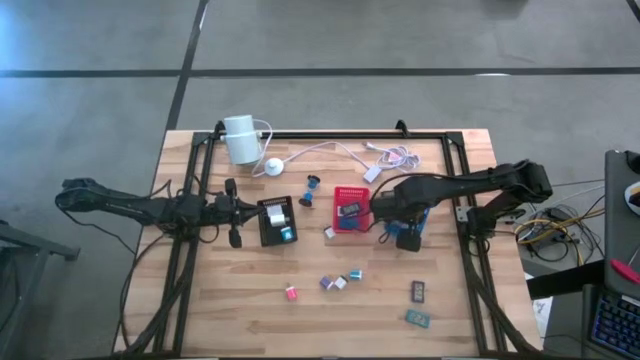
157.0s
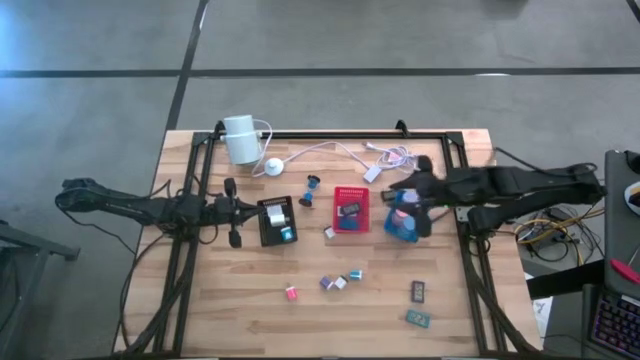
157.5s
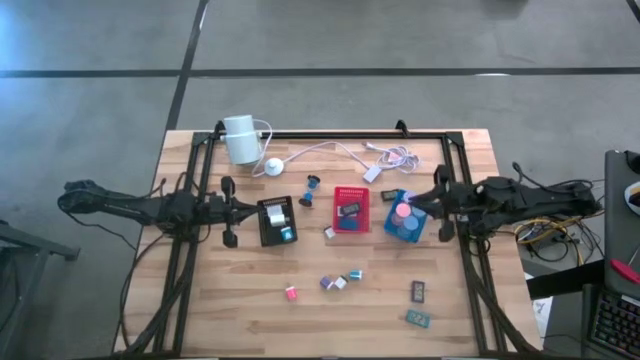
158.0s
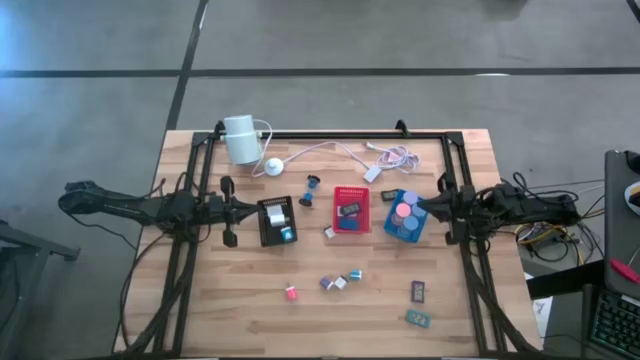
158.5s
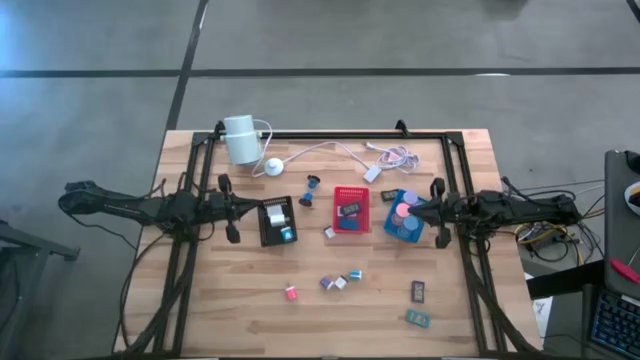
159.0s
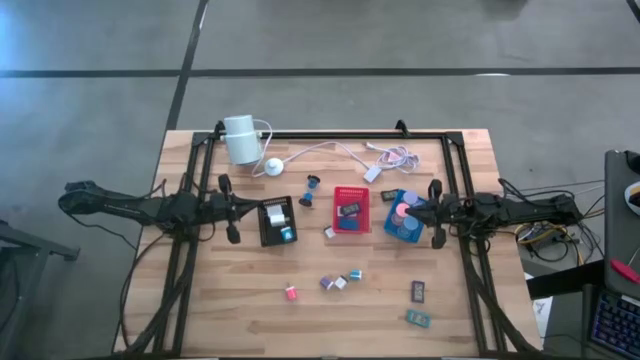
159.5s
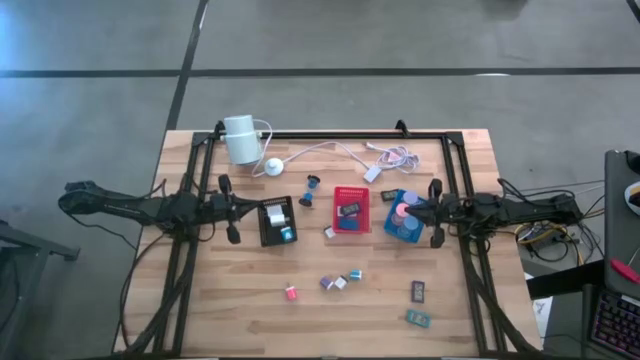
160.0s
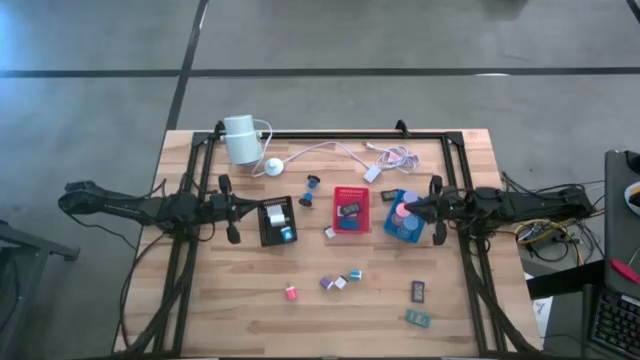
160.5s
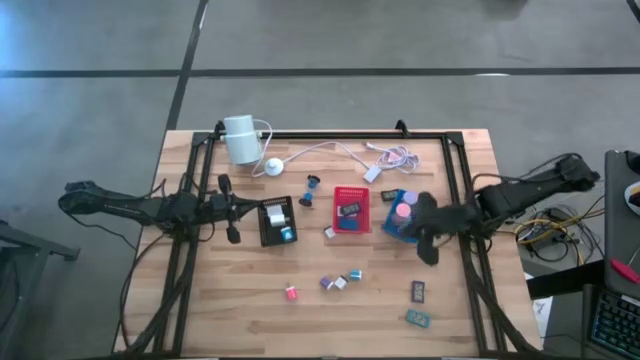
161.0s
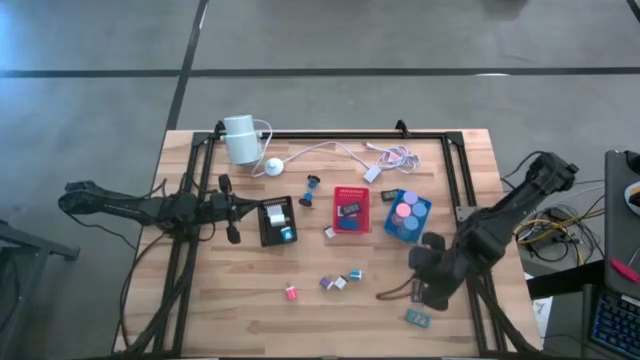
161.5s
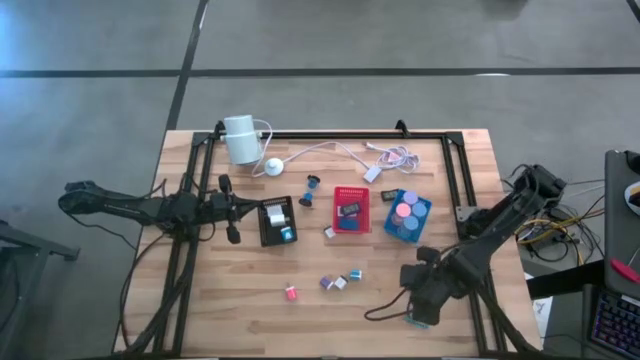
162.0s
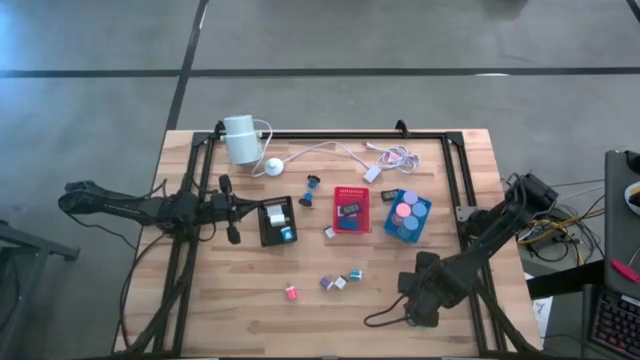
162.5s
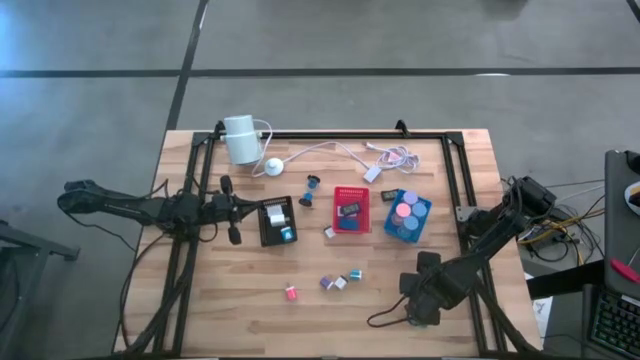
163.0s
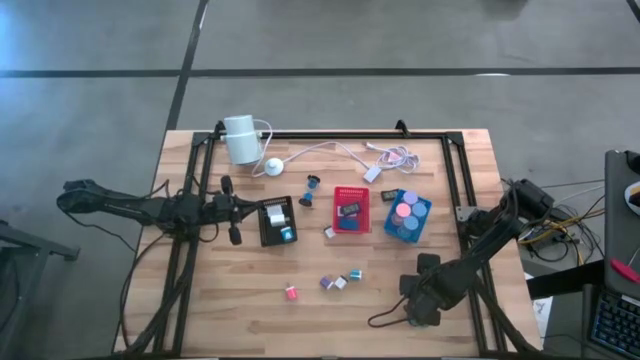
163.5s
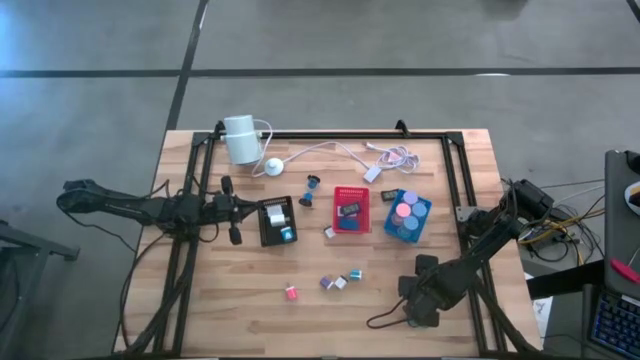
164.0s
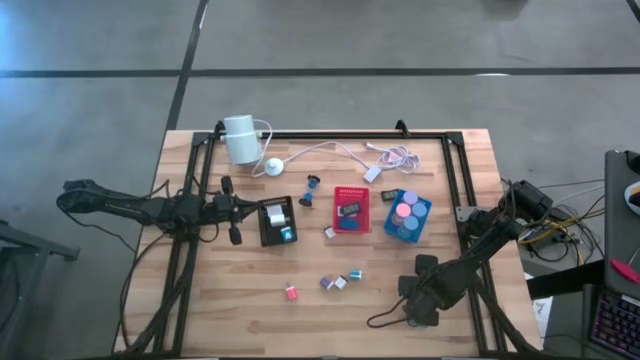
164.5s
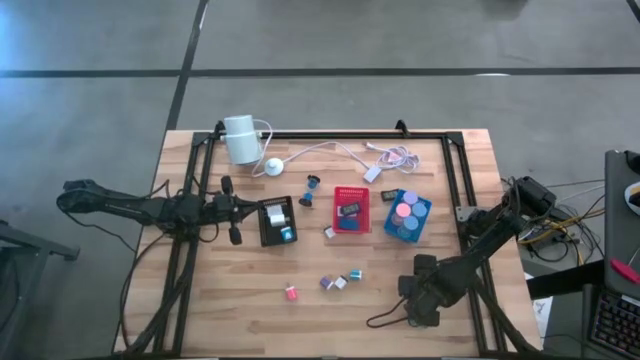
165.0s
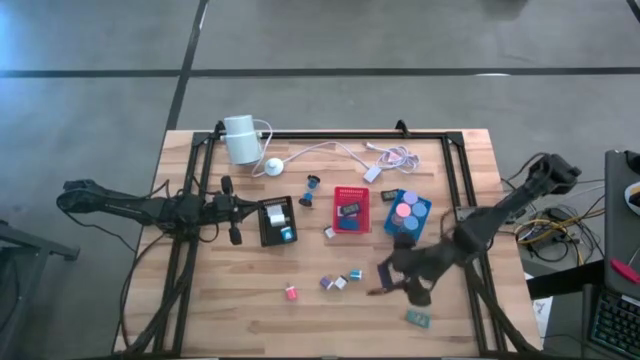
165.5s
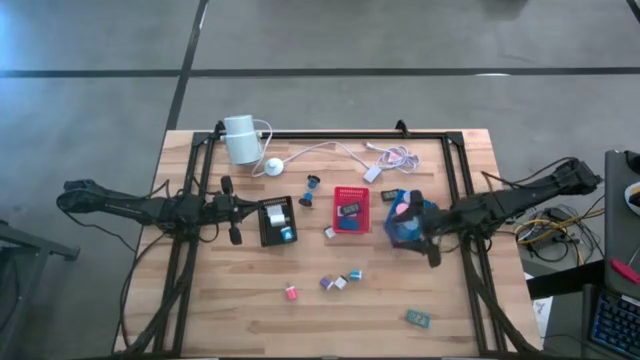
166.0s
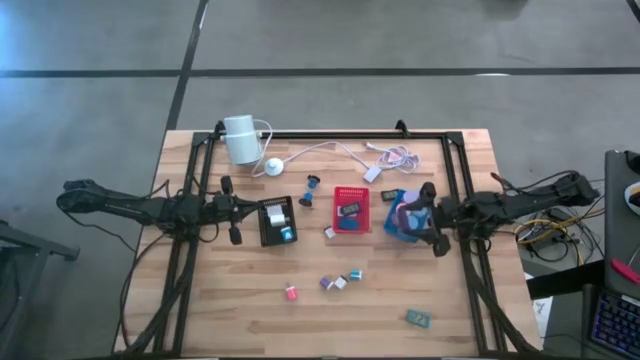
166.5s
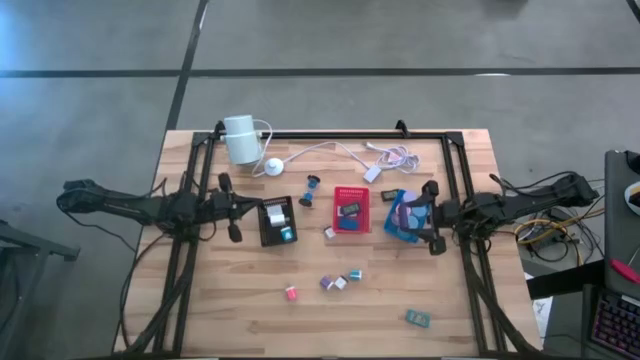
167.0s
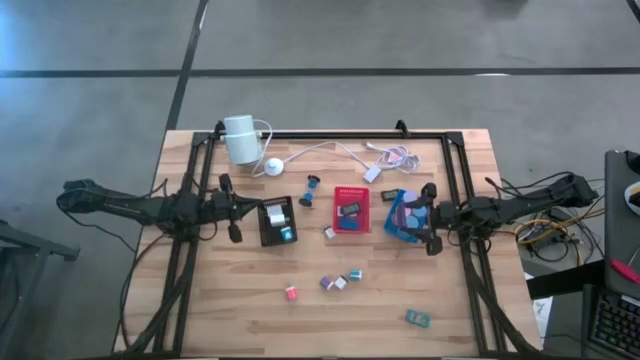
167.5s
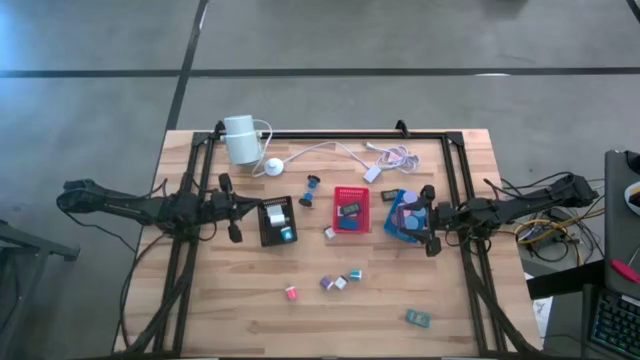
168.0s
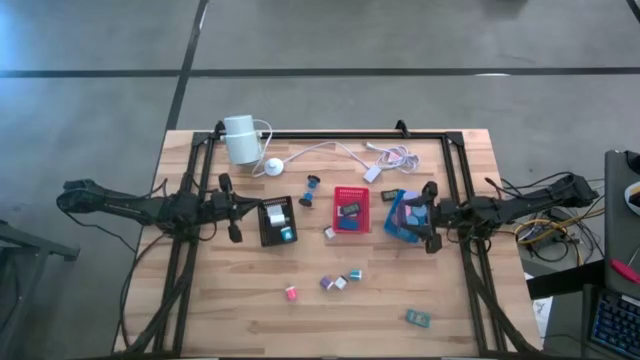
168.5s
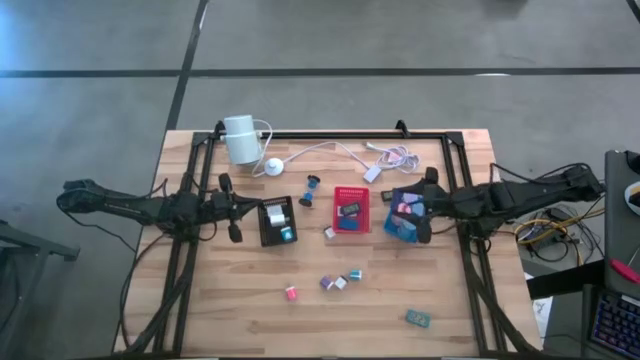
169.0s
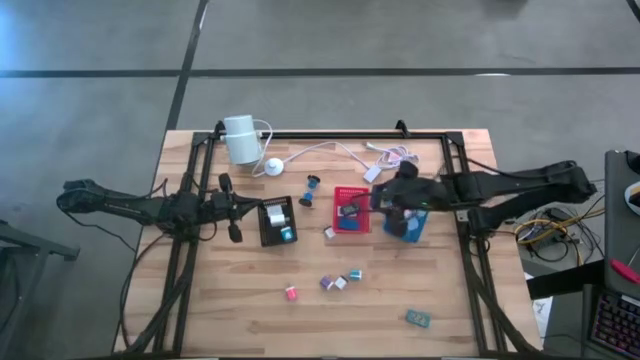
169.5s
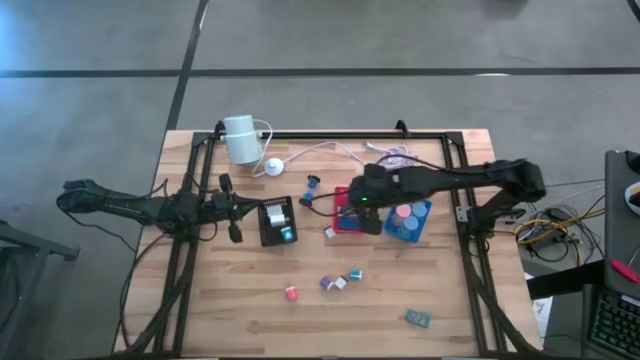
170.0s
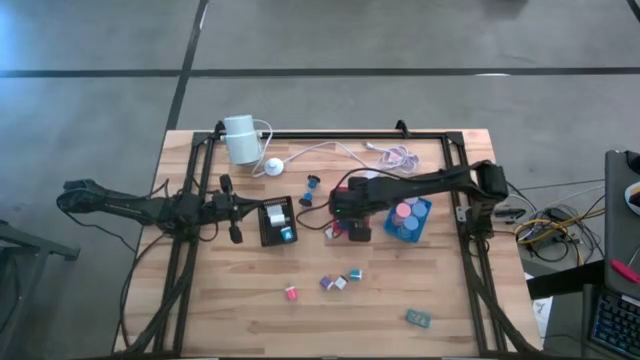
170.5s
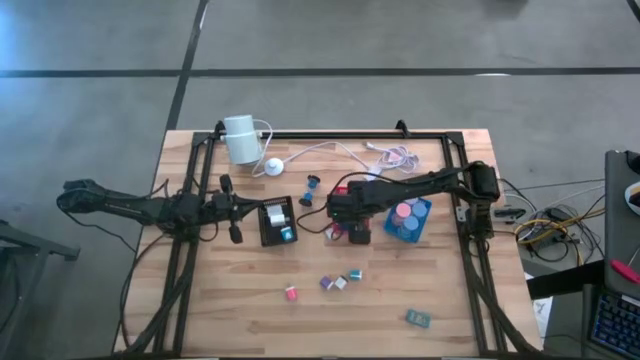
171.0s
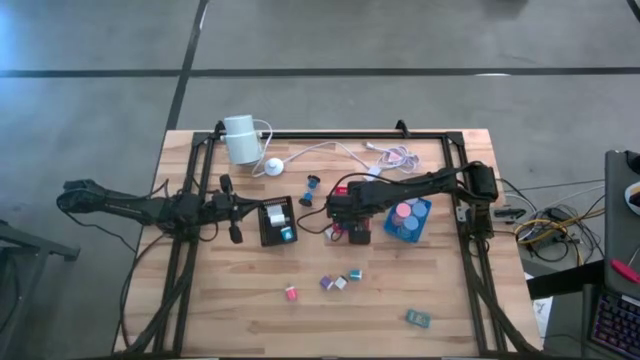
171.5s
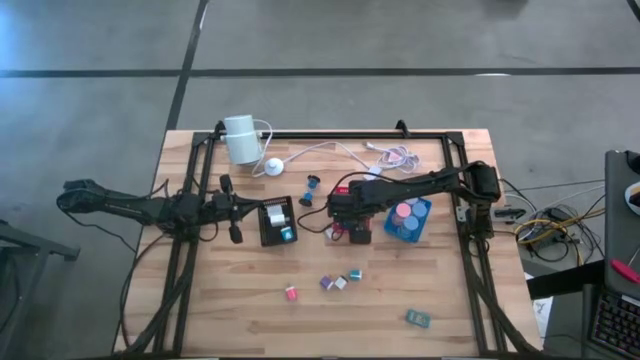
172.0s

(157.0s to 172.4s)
Task: Pick & Place Office items
Put the dark blue digital clock into the red bin

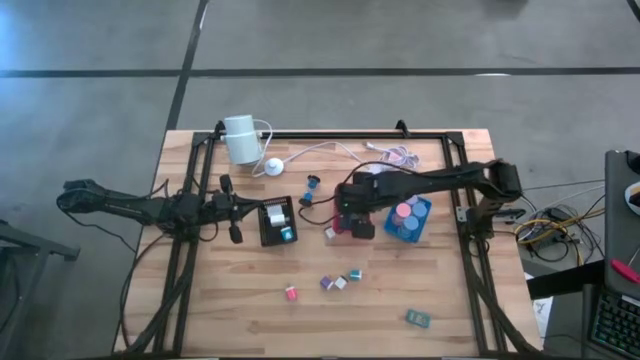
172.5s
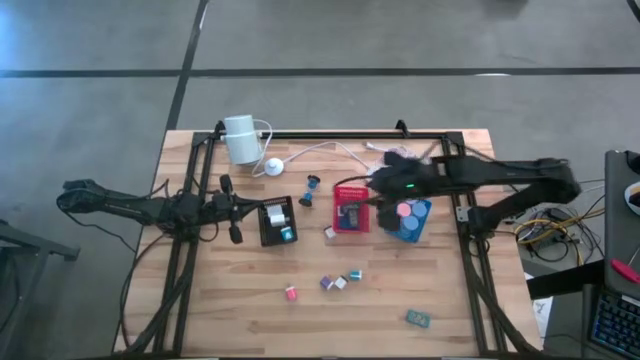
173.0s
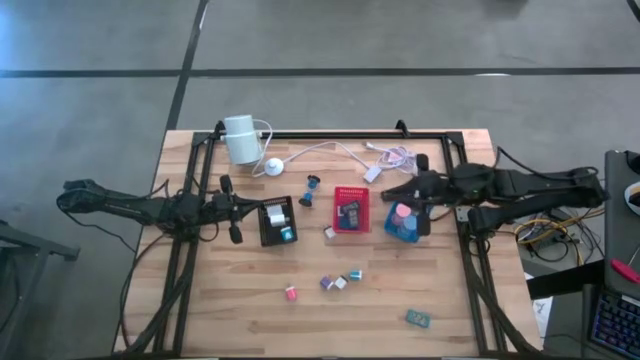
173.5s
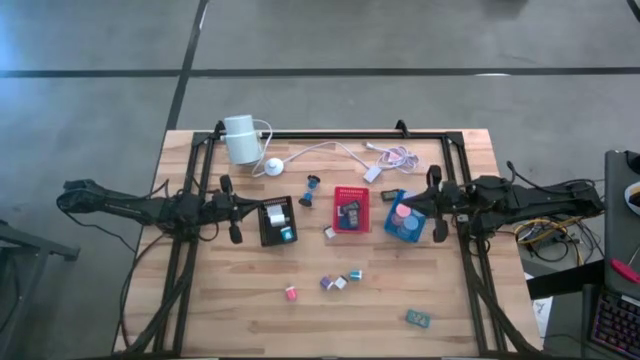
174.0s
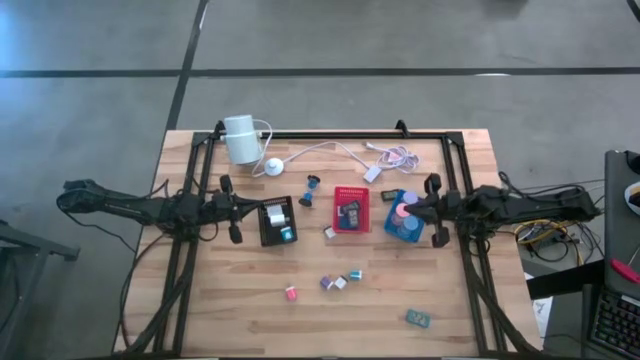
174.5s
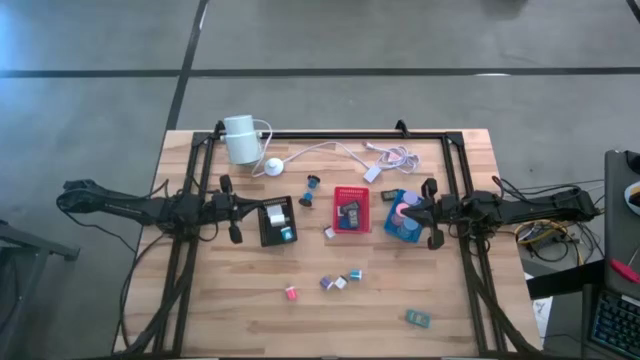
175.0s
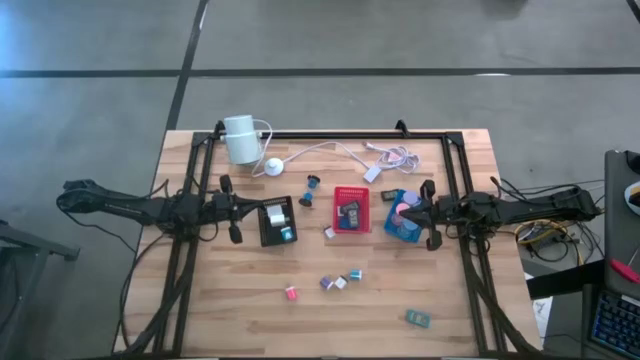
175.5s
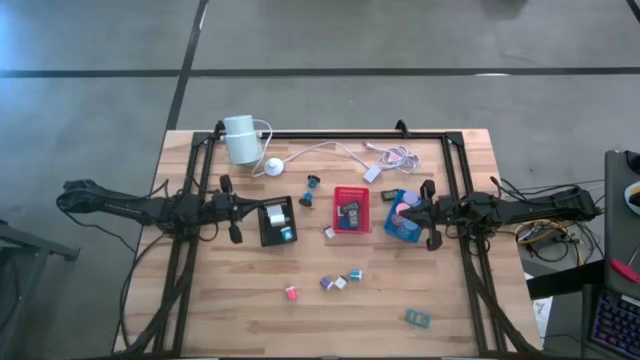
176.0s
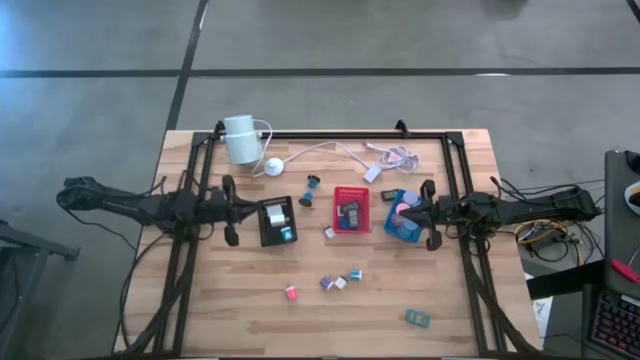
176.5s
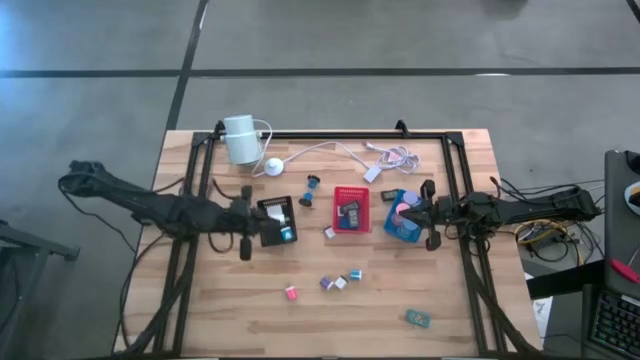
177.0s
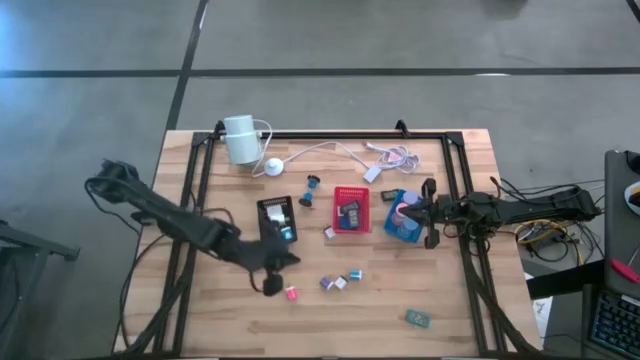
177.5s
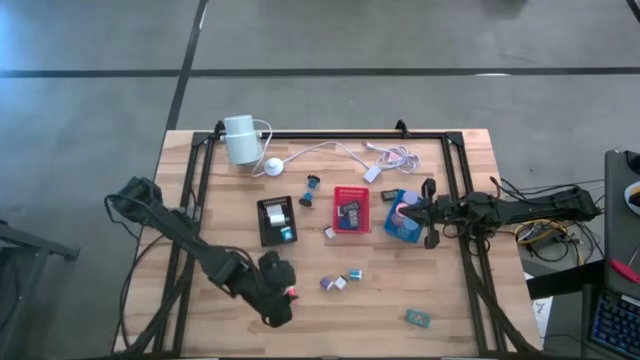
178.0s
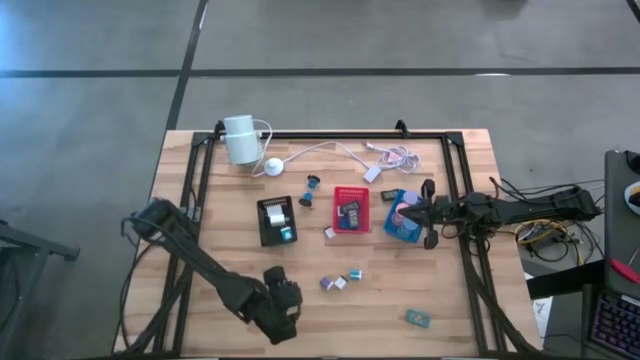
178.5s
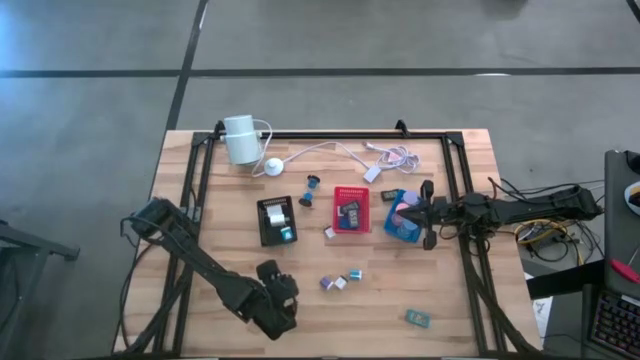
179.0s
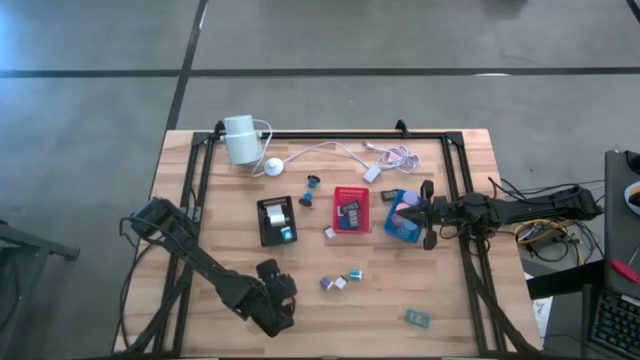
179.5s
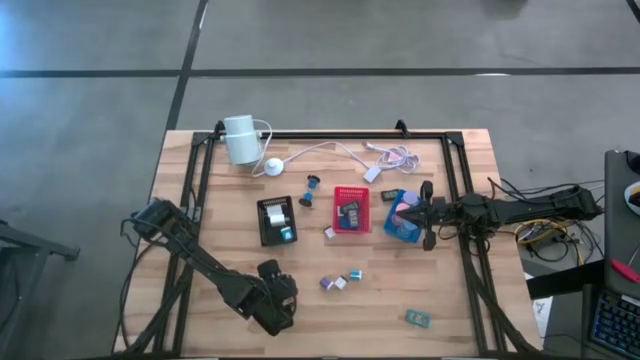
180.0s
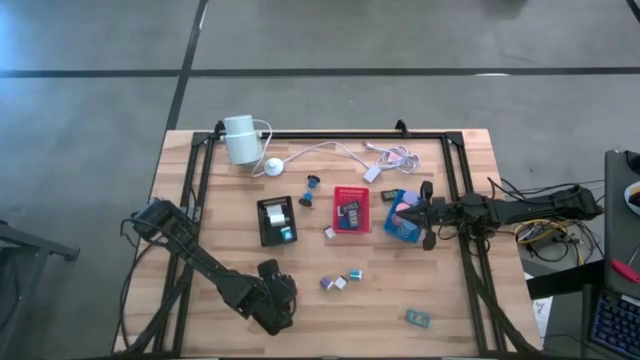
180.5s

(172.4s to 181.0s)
Put the red charger adapter into the black bin
